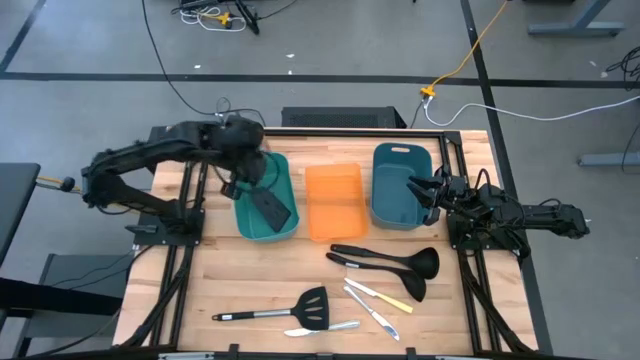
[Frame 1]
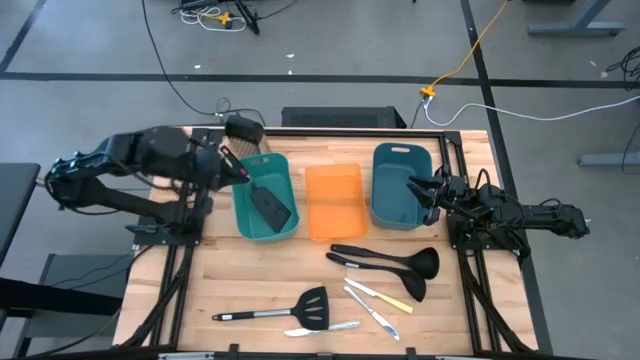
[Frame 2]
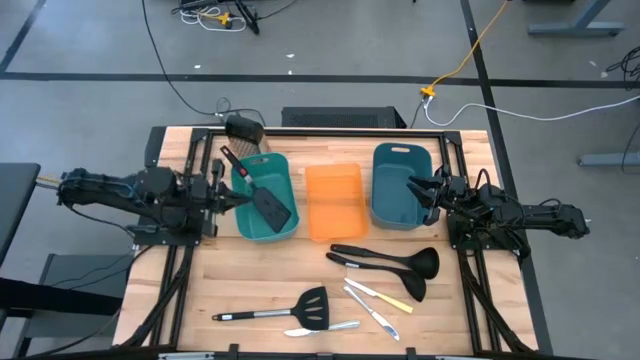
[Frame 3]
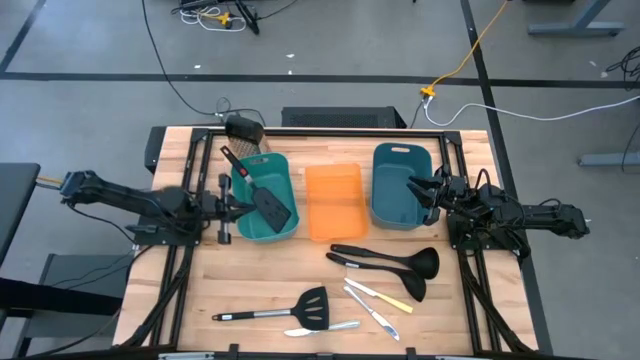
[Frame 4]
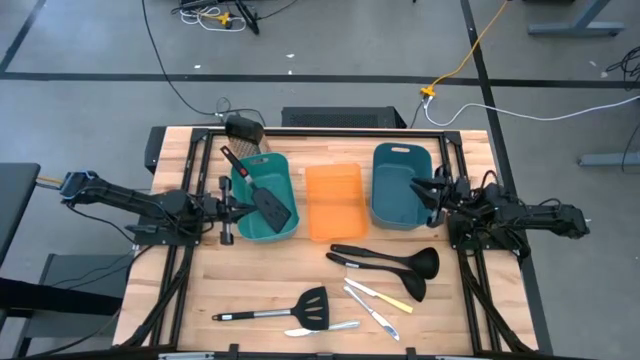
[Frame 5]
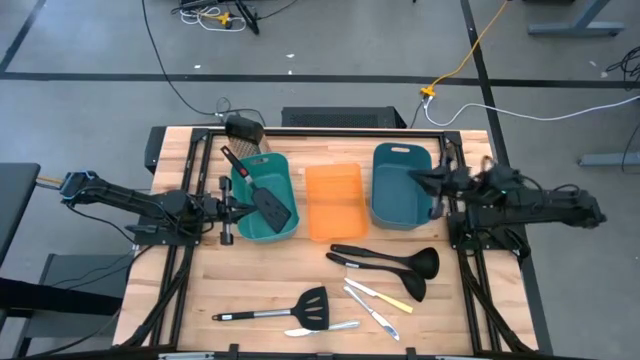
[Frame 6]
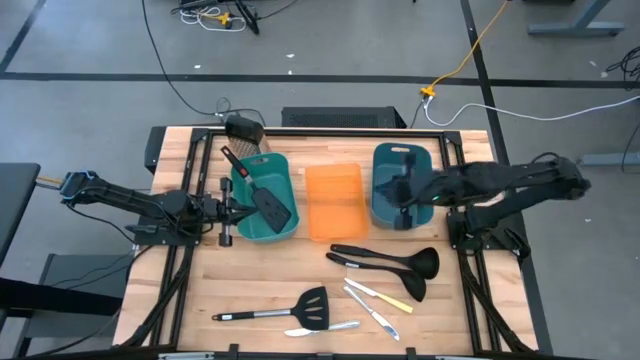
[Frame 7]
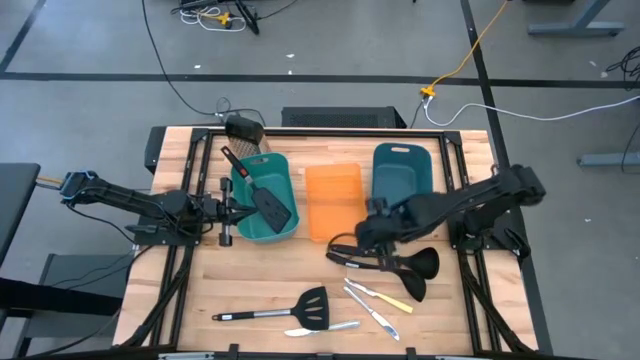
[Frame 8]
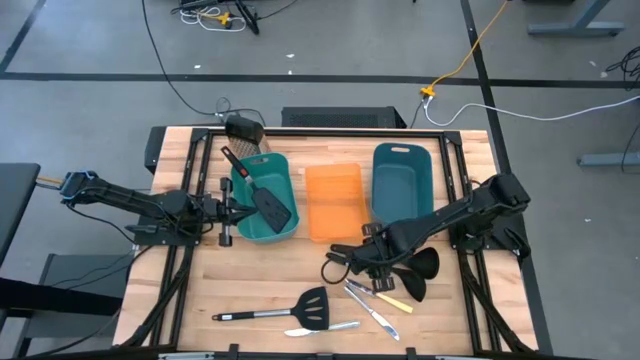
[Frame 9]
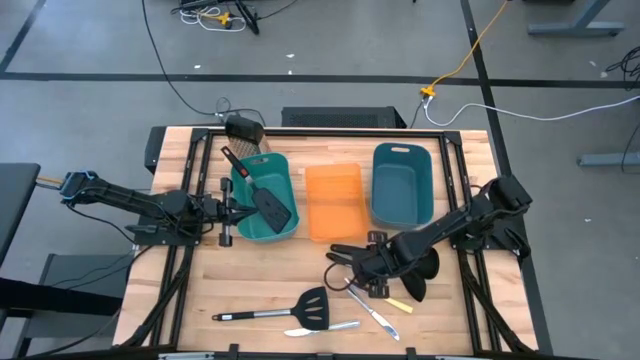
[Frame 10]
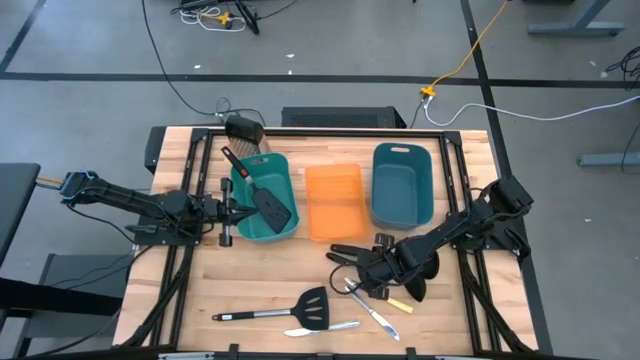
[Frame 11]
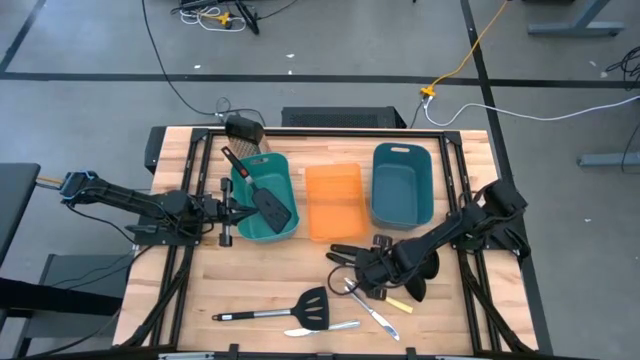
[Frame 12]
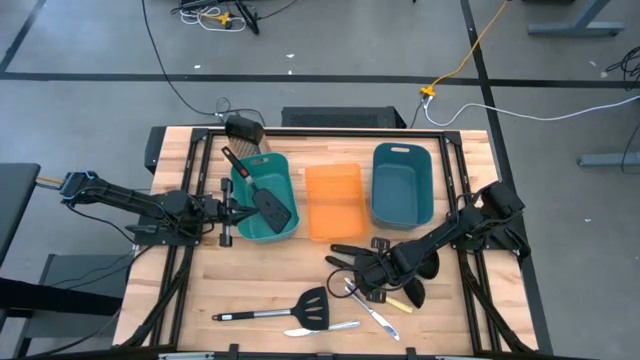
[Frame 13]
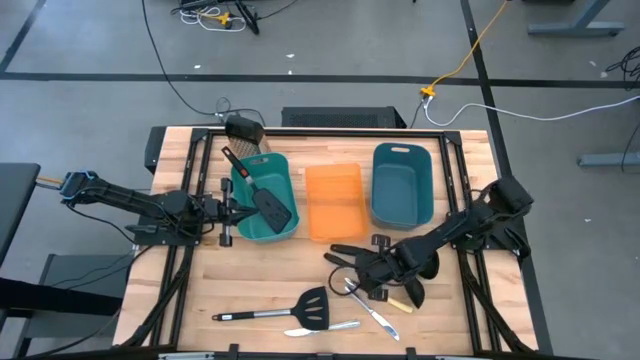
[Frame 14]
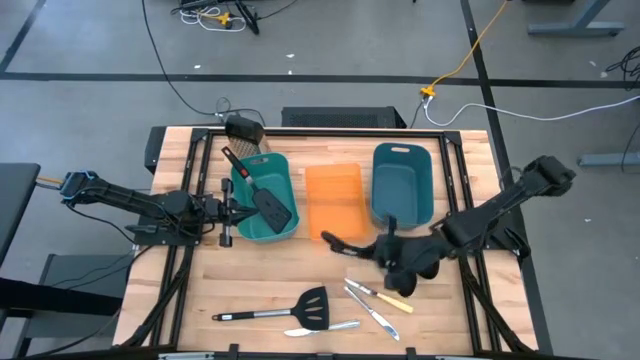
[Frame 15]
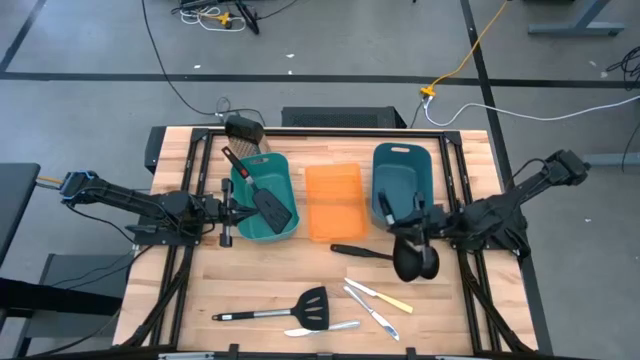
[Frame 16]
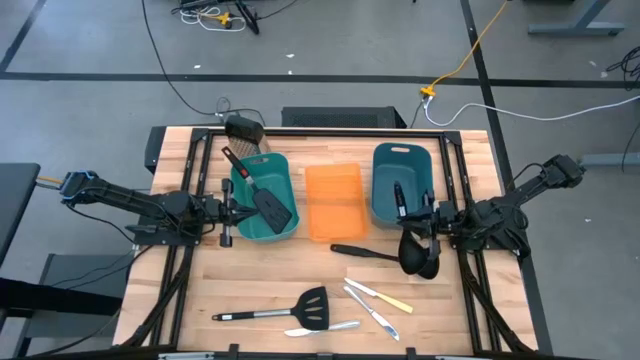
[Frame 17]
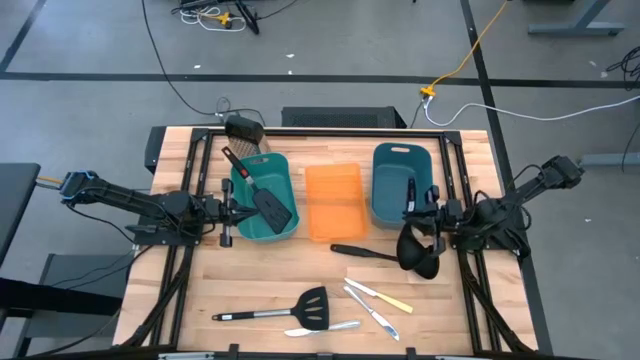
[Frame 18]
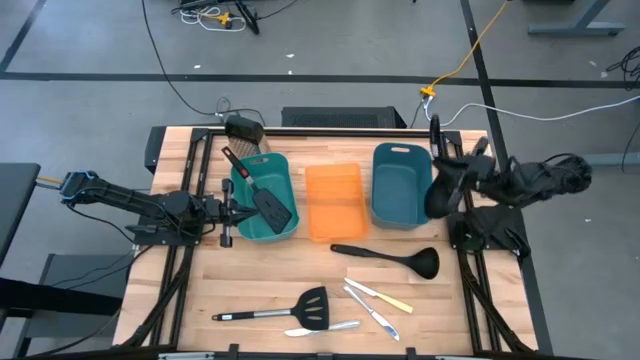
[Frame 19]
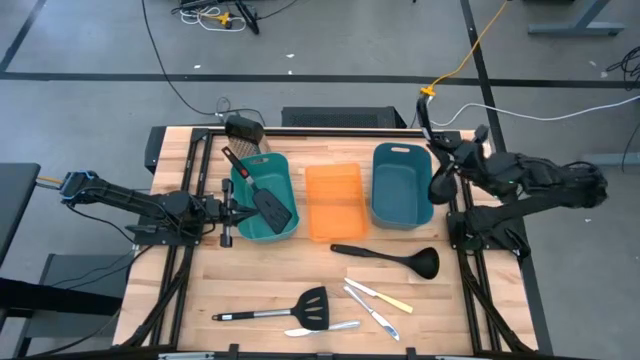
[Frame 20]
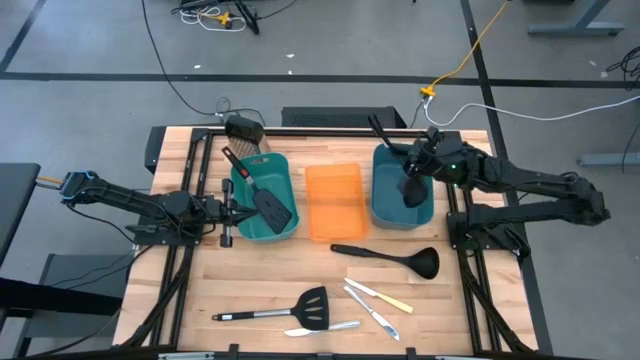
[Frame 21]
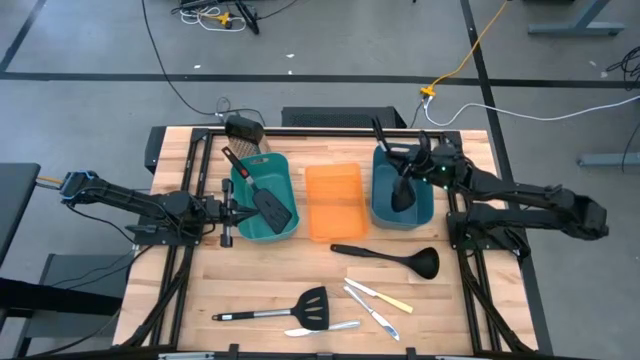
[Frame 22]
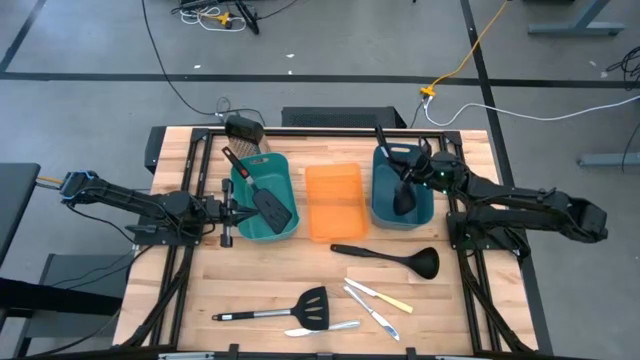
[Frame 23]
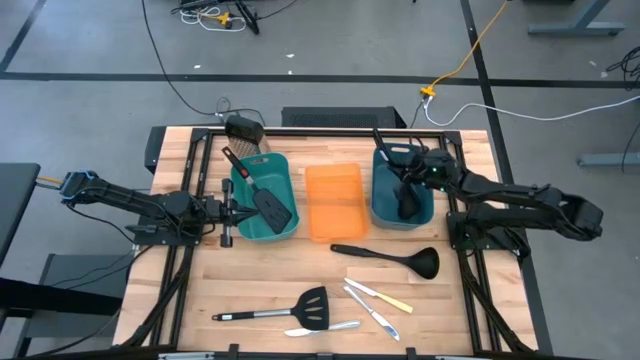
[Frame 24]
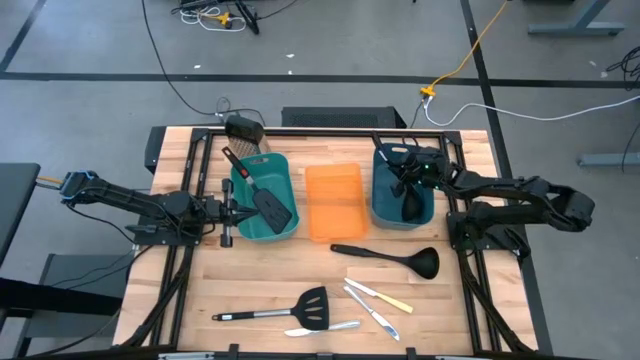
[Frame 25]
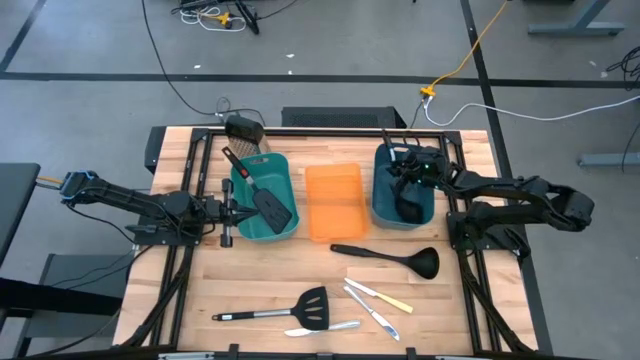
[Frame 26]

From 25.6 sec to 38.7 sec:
Task: Pick & Place Kitchen Items
Put the black serving spoon into the blue bin

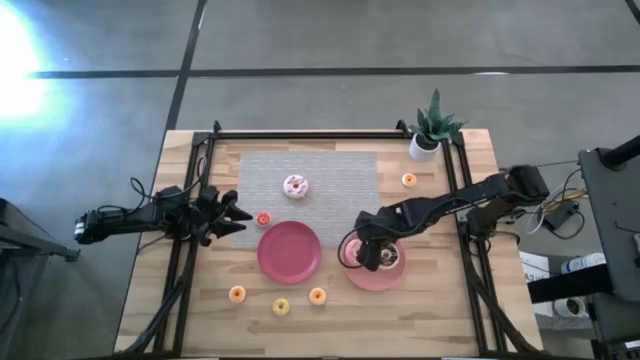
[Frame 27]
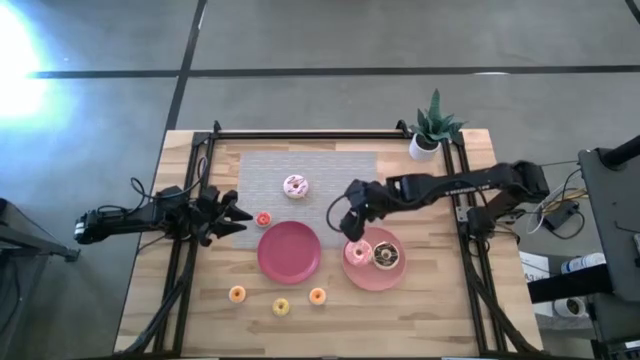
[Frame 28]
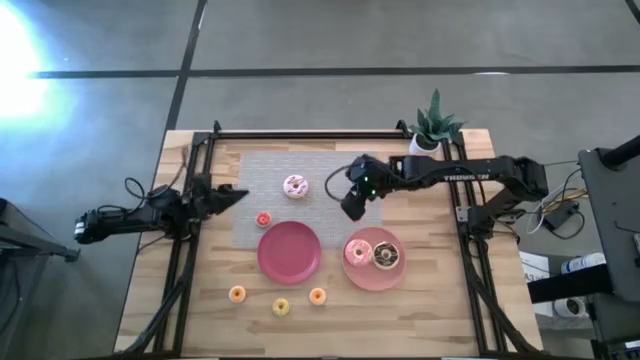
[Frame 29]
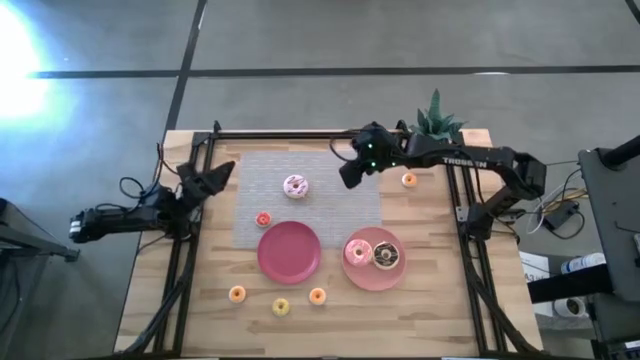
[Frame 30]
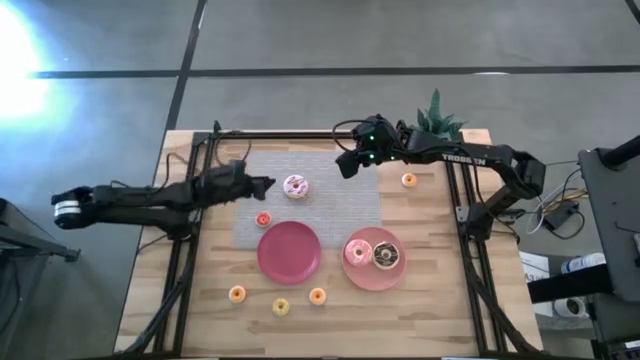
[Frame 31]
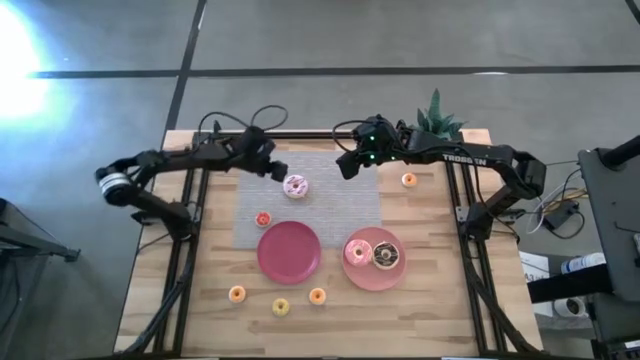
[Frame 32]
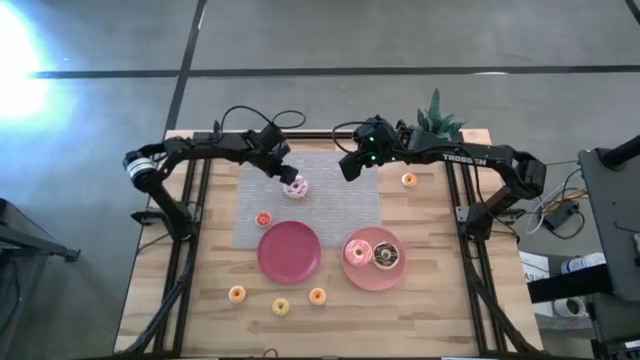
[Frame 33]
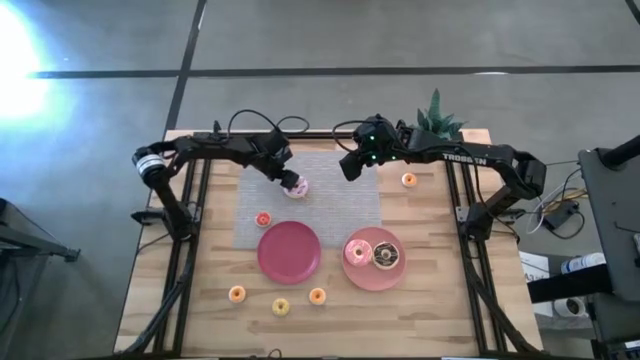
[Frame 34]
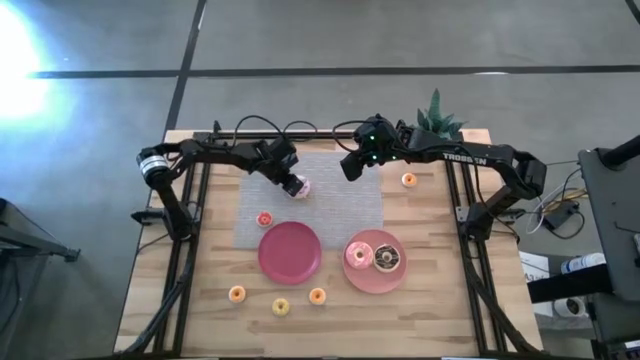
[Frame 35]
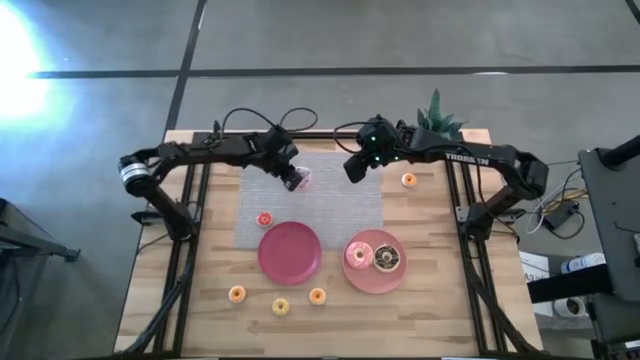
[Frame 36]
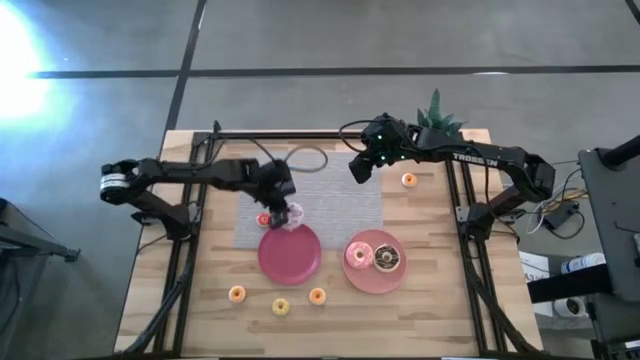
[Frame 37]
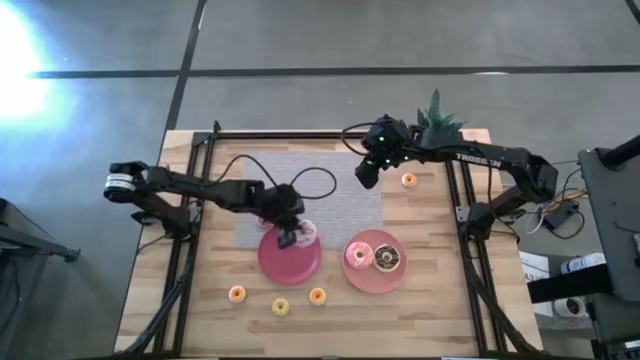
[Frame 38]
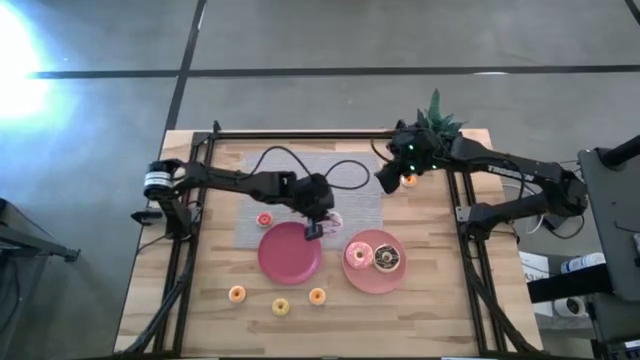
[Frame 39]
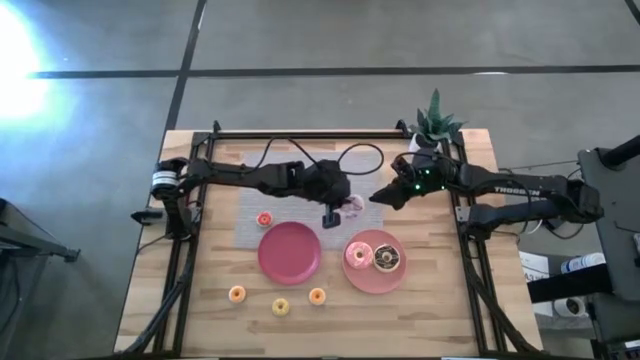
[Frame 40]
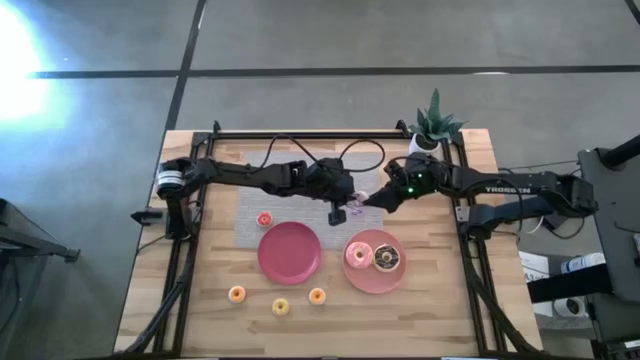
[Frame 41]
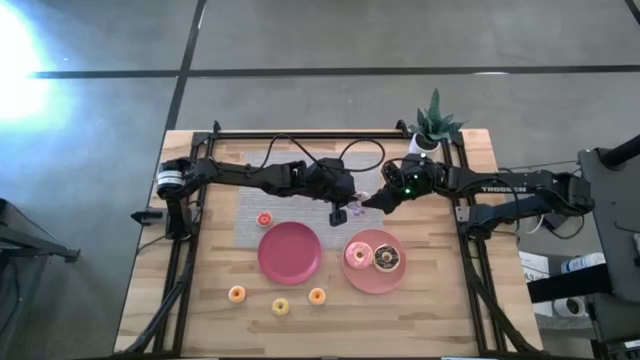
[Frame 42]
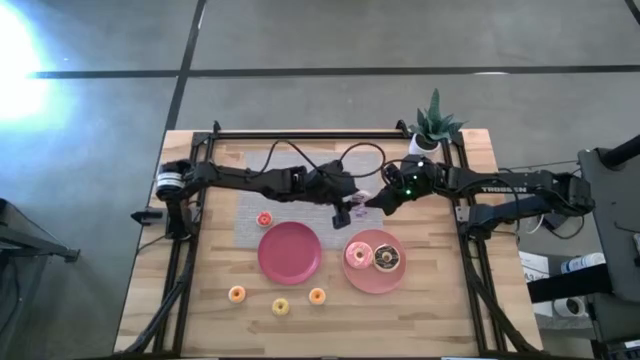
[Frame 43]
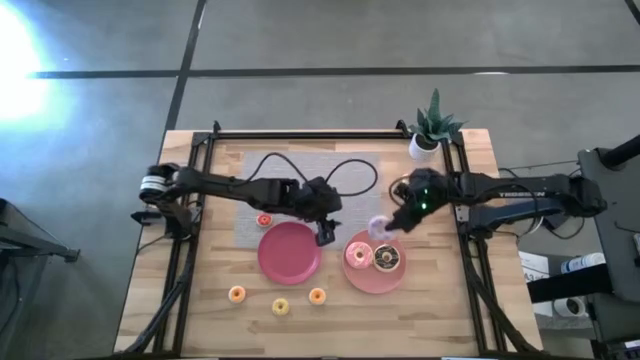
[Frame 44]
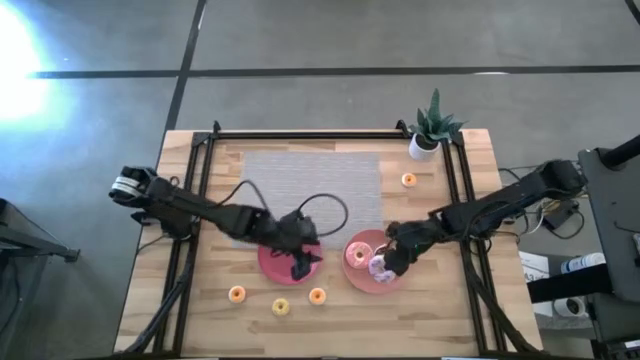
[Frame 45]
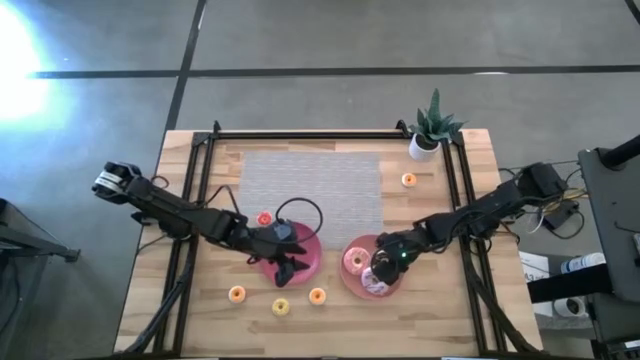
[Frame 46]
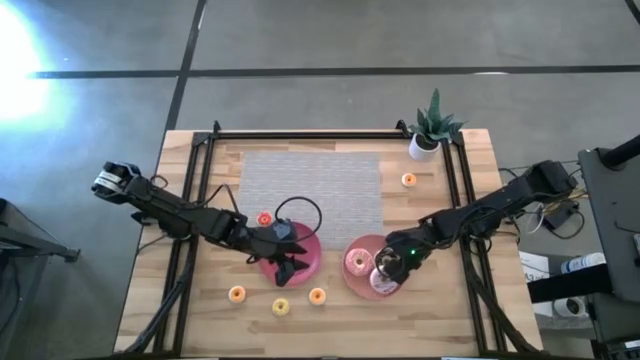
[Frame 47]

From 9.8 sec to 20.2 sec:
Task: Pick & Place donuts
Put the purple big donut on the light pink plate
